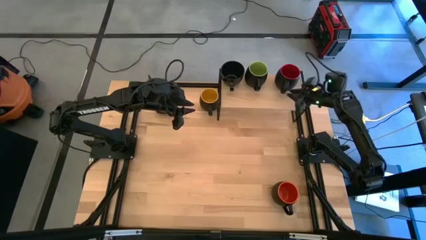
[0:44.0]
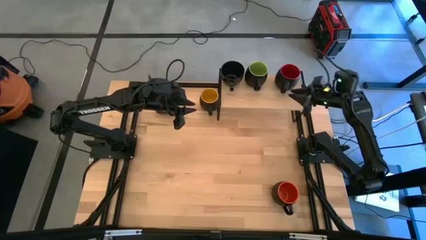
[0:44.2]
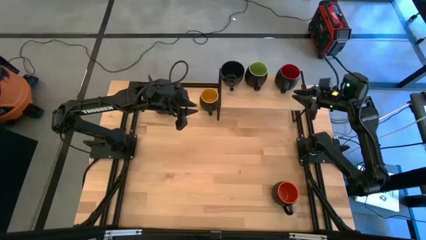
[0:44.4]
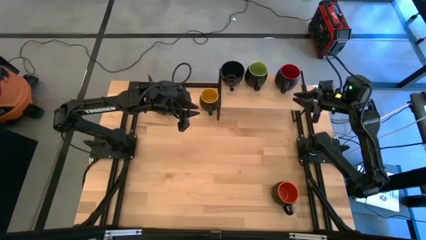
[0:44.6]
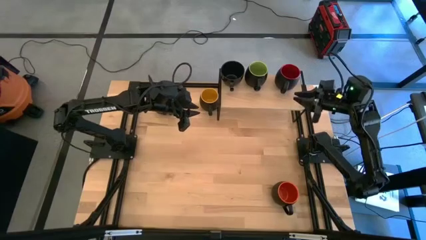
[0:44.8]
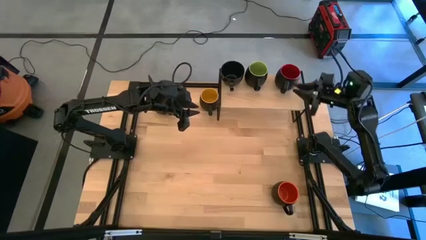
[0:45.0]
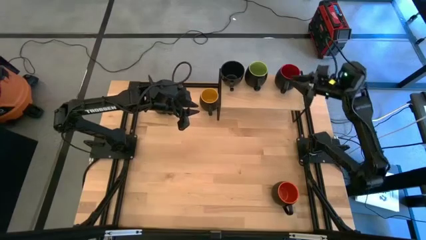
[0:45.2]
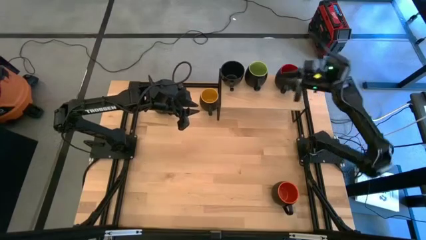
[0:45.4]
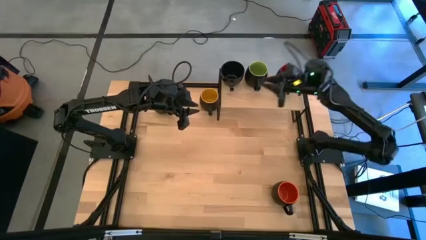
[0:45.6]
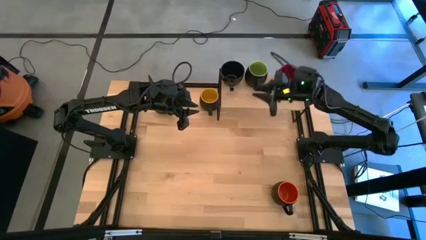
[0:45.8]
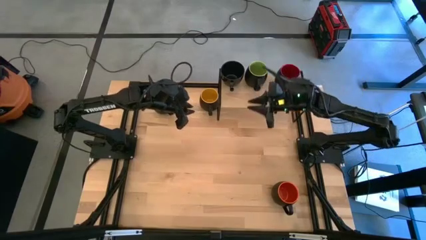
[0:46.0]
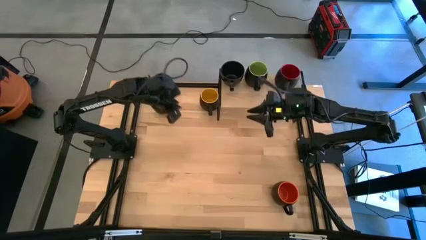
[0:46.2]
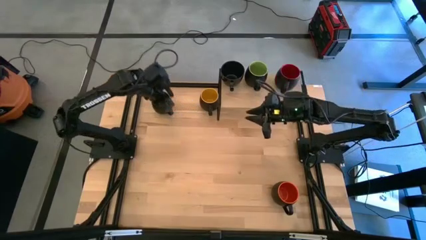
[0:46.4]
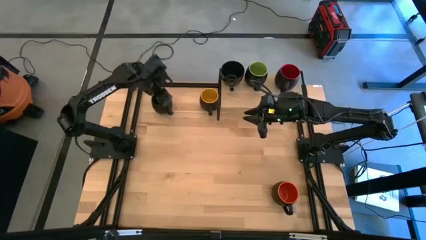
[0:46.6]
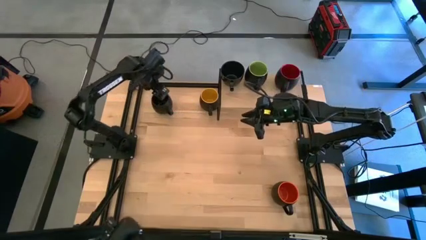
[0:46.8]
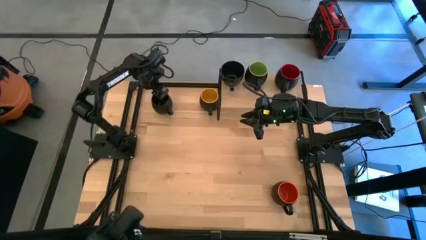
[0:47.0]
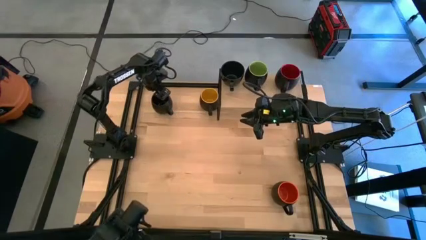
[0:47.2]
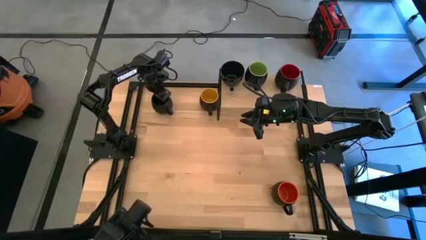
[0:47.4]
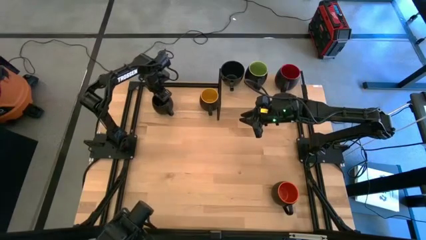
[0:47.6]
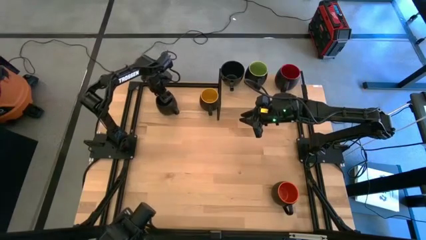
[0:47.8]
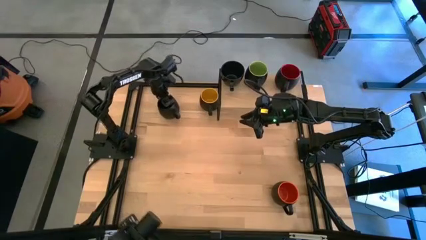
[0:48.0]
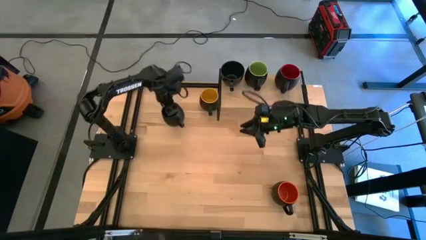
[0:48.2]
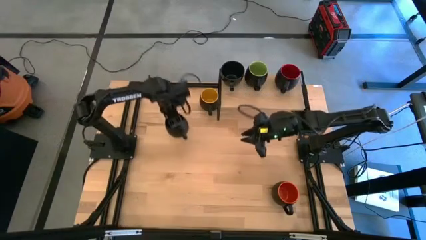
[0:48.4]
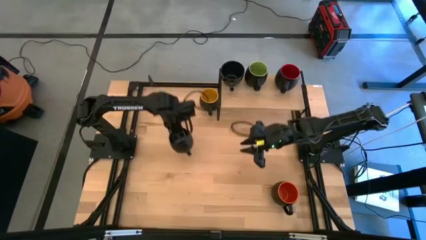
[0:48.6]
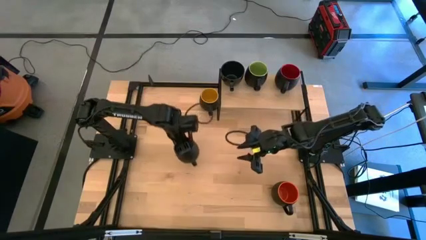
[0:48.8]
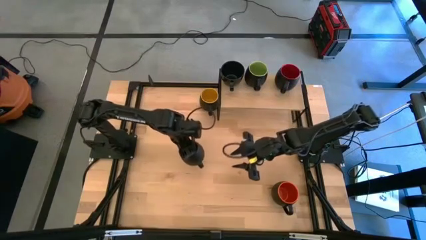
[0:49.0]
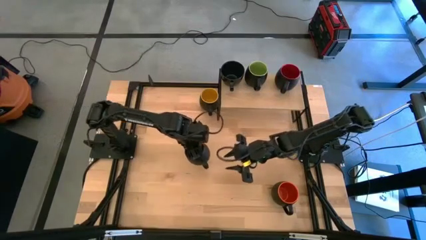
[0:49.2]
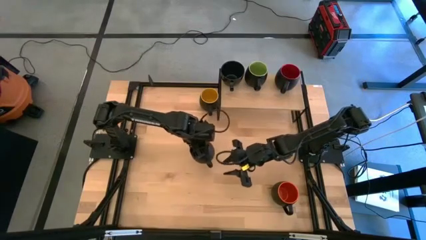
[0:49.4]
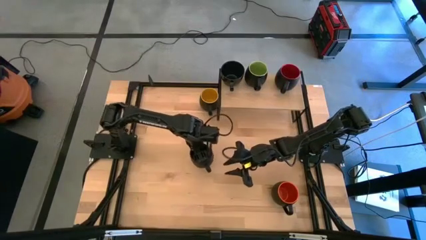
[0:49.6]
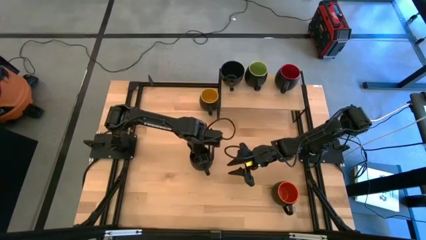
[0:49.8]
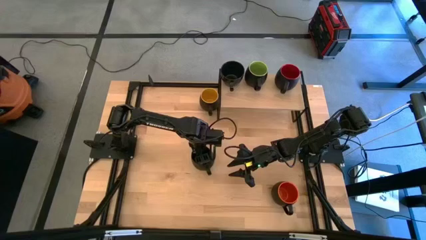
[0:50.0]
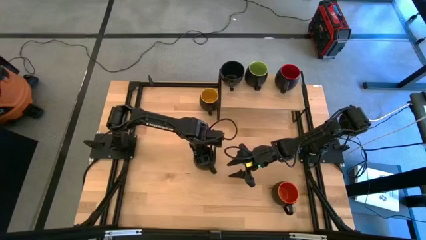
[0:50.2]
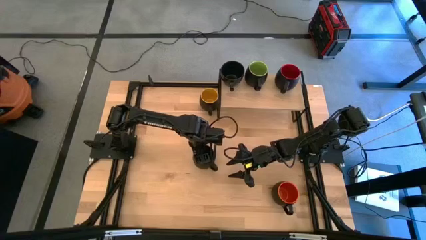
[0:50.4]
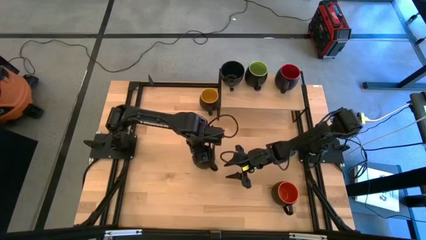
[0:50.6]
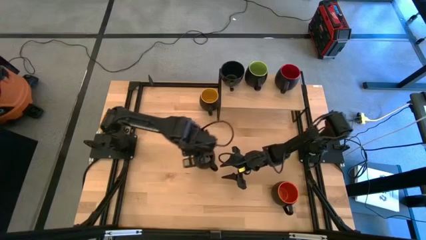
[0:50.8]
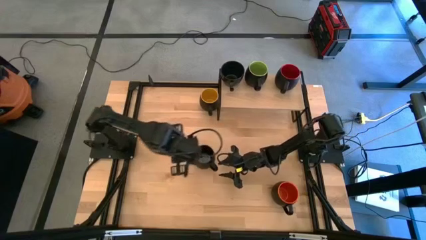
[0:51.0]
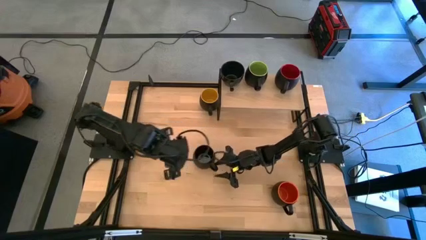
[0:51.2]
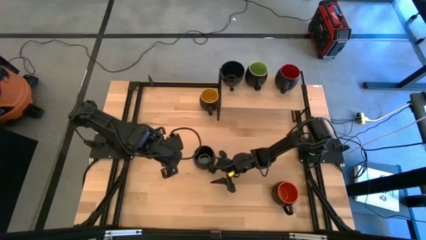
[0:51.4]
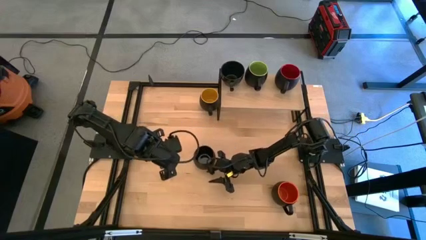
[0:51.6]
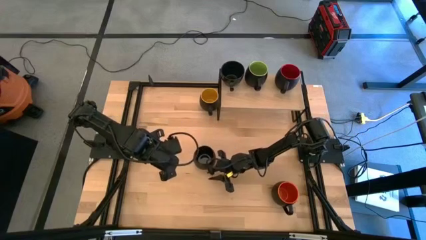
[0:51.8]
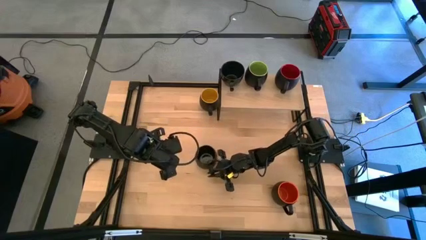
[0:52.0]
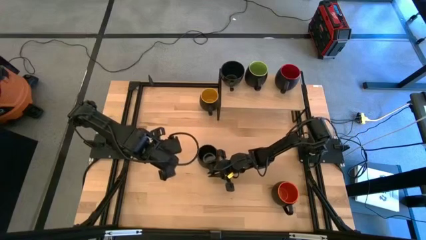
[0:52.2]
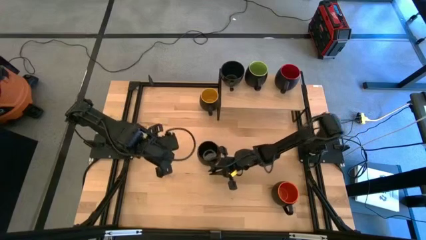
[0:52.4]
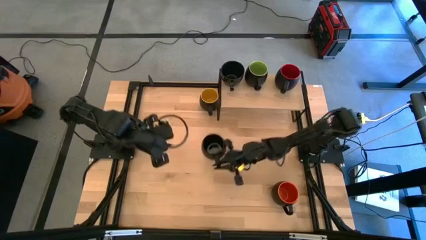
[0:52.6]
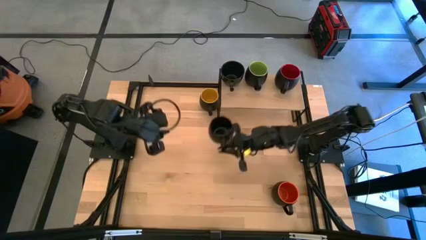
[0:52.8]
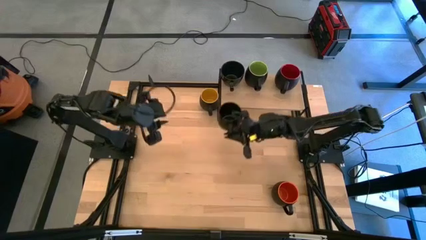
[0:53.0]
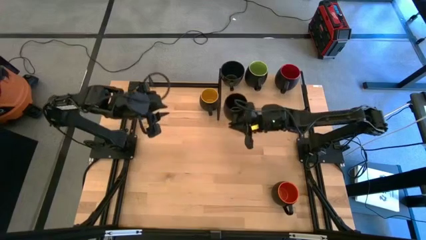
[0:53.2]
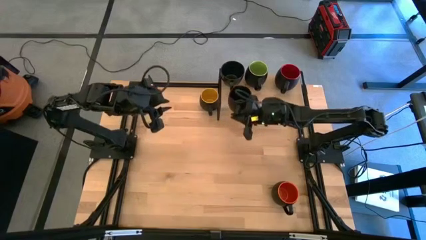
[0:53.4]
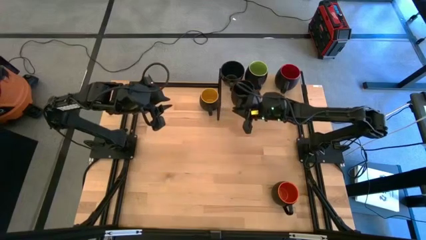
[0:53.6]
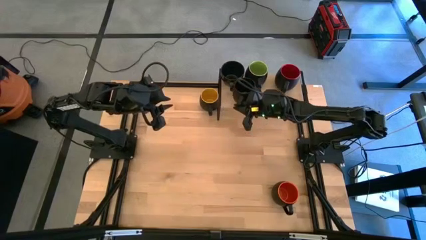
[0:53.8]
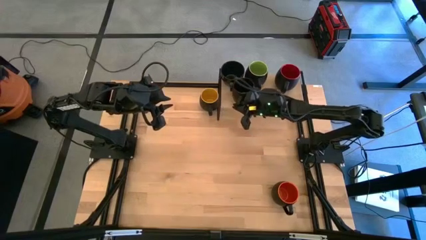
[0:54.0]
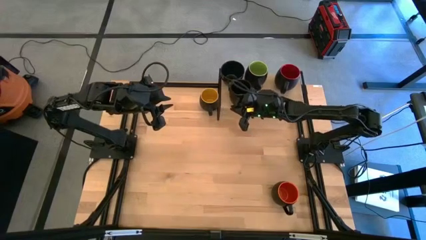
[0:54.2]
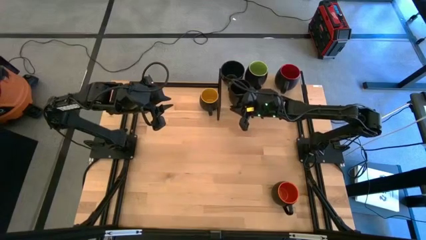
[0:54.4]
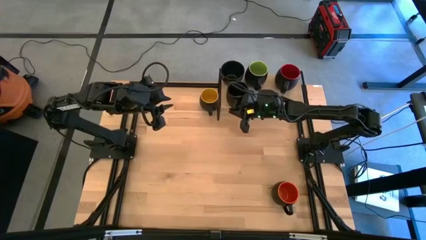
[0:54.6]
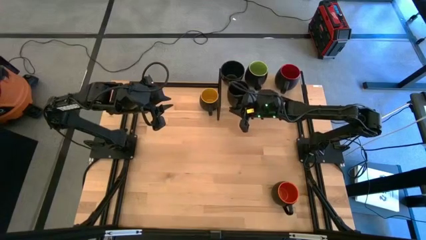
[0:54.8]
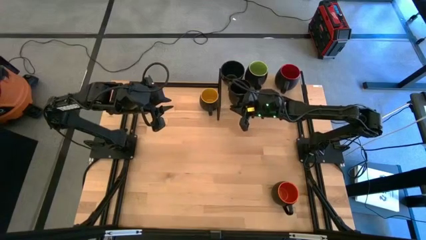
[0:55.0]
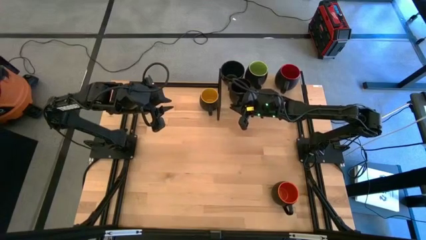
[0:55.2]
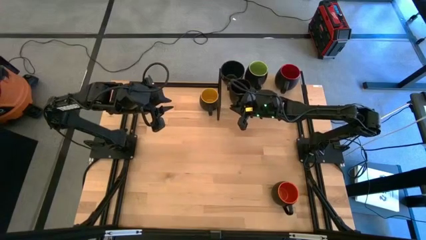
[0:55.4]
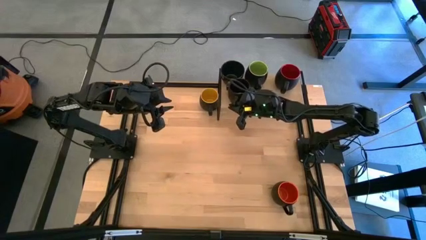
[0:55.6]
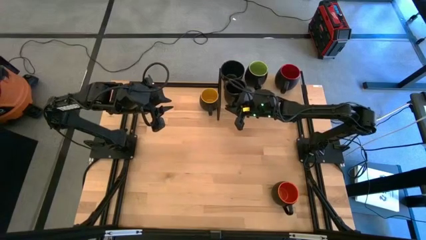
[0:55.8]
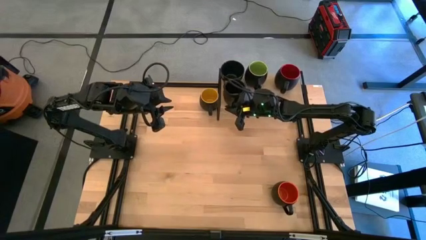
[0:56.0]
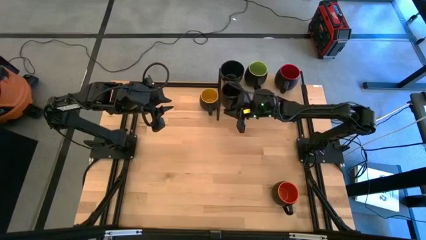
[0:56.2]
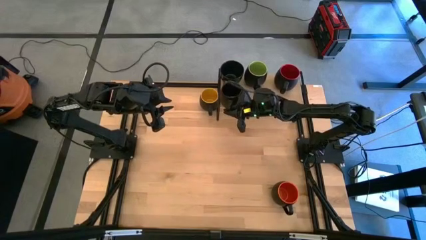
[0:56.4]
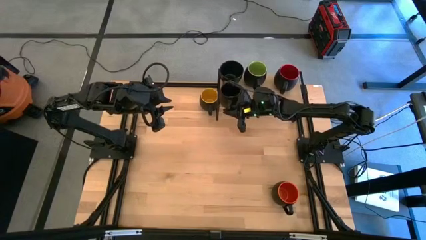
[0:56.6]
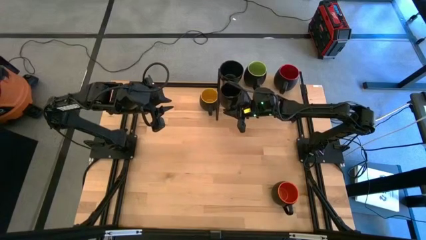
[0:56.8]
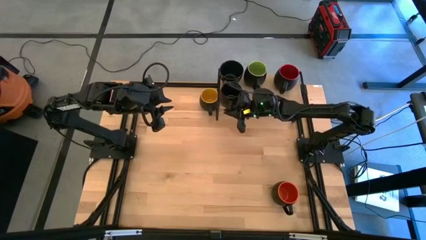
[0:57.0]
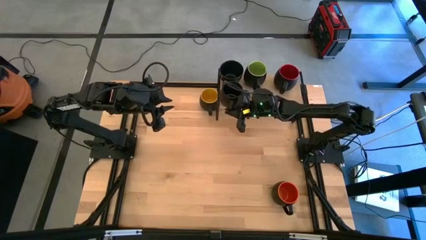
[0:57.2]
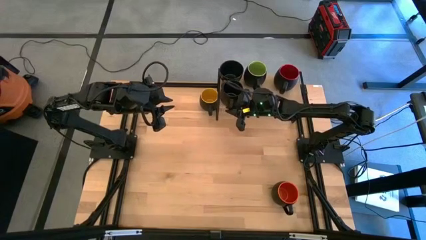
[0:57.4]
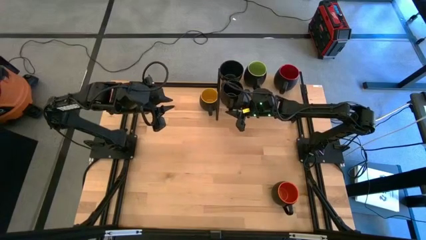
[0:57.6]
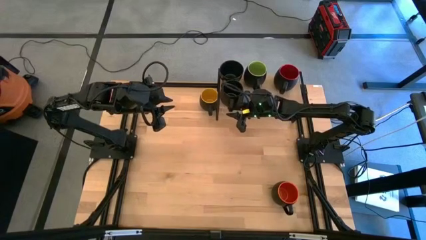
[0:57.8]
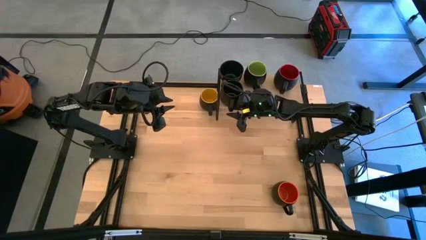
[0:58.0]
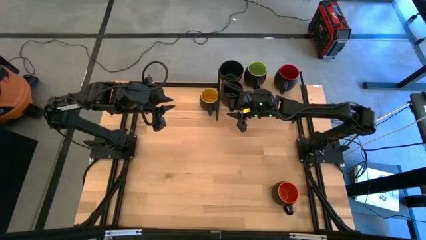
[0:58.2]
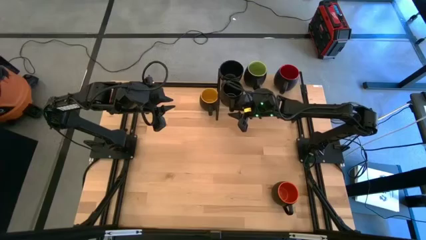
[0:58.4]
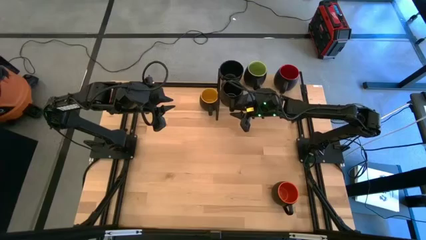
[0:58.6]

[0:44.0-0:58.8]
Task: Place coffee mugs
Put the black mug on the shelf aligned with other black mug
